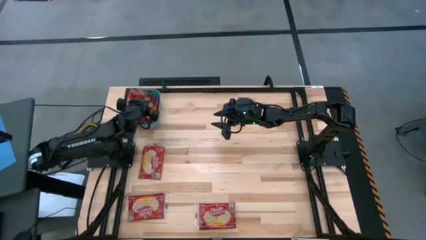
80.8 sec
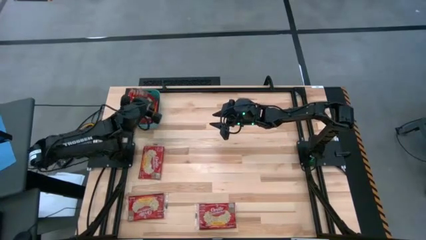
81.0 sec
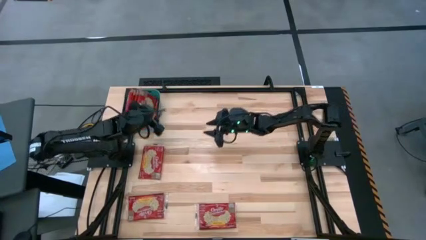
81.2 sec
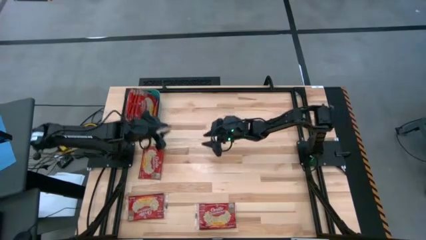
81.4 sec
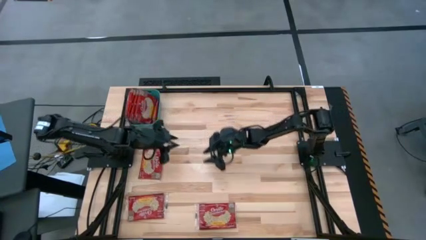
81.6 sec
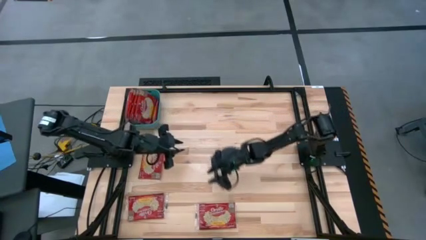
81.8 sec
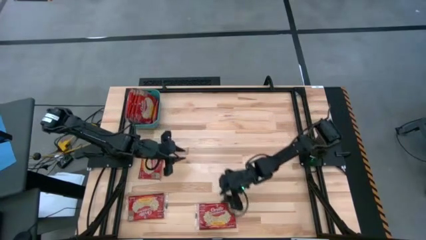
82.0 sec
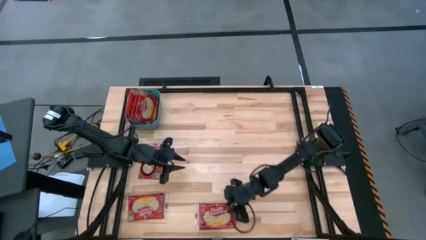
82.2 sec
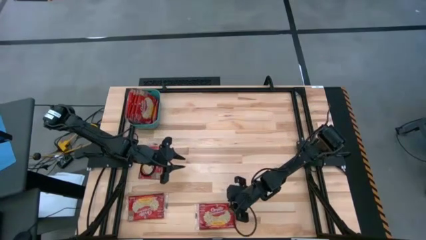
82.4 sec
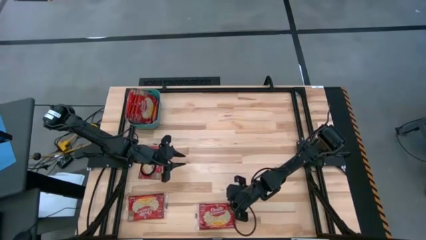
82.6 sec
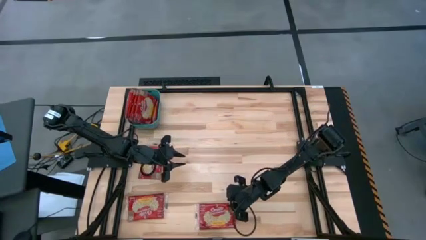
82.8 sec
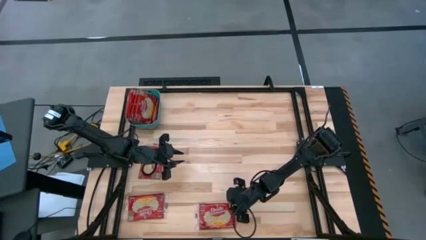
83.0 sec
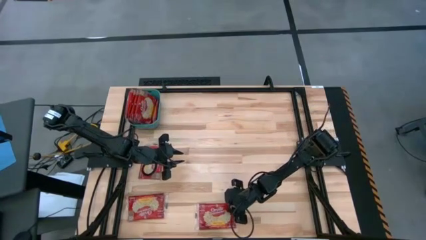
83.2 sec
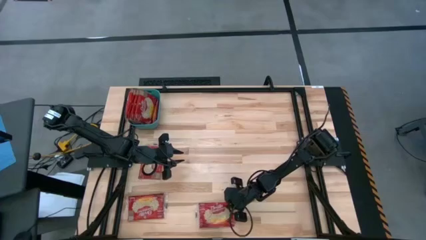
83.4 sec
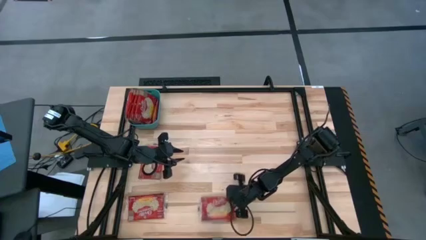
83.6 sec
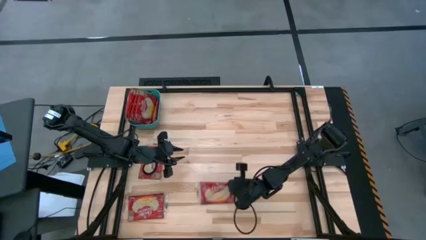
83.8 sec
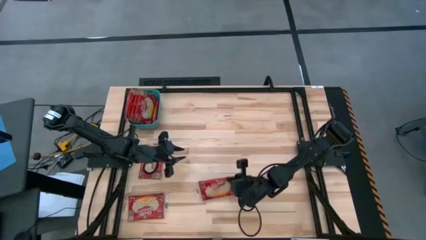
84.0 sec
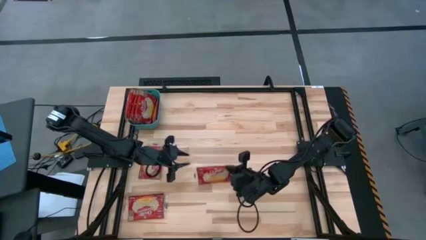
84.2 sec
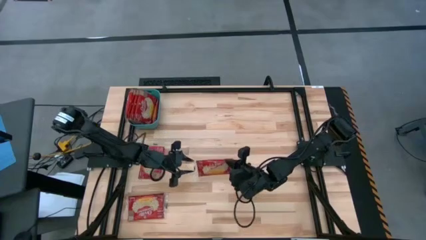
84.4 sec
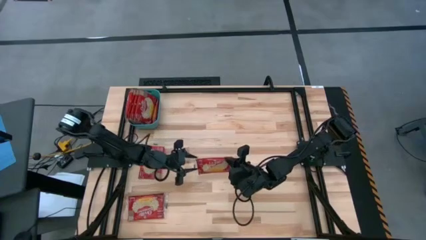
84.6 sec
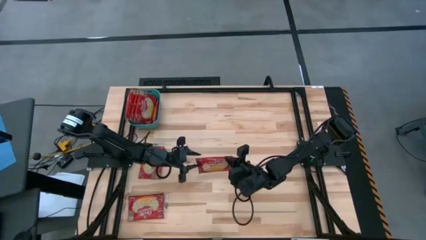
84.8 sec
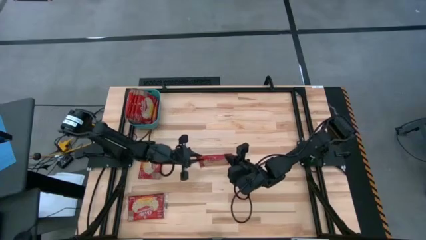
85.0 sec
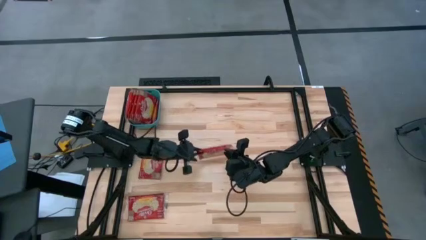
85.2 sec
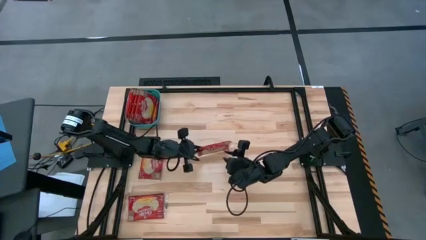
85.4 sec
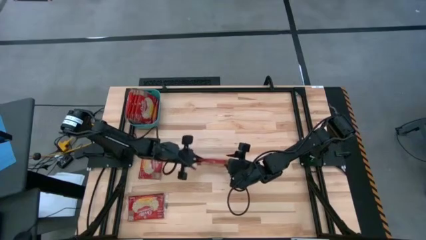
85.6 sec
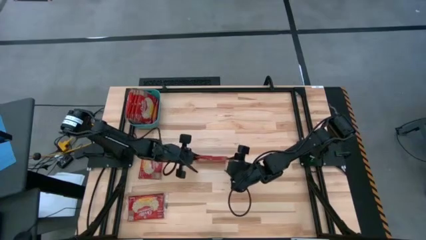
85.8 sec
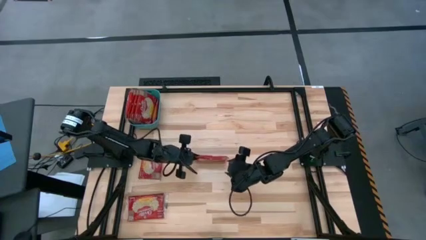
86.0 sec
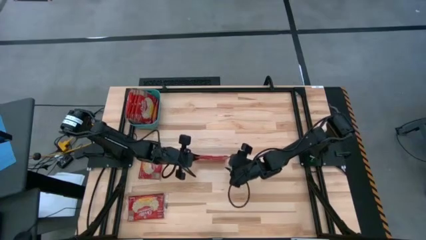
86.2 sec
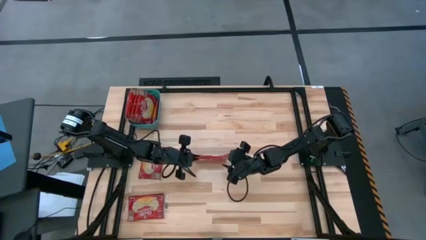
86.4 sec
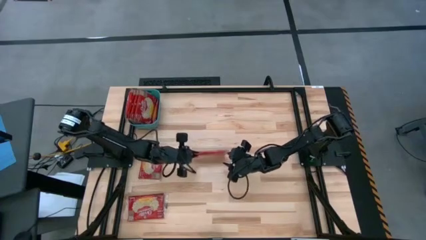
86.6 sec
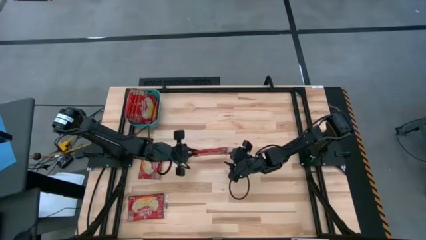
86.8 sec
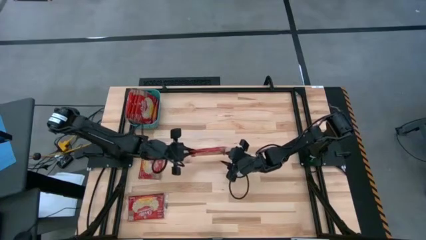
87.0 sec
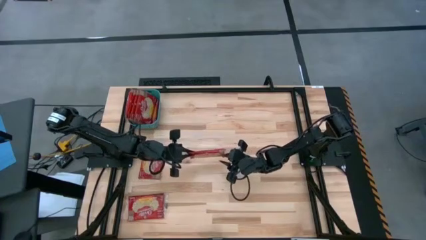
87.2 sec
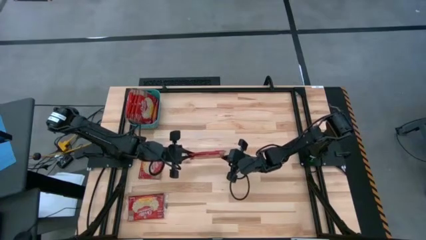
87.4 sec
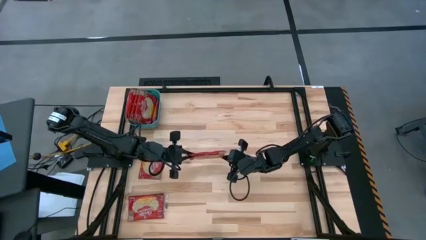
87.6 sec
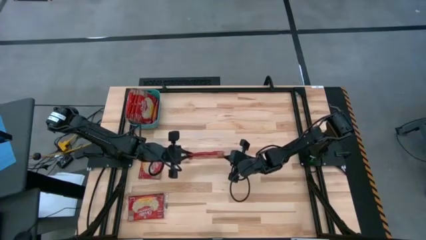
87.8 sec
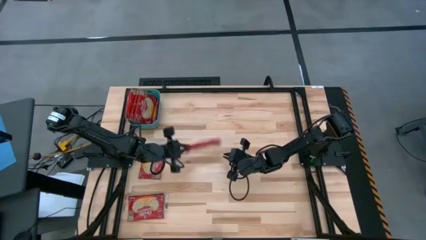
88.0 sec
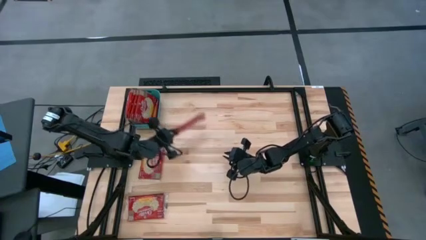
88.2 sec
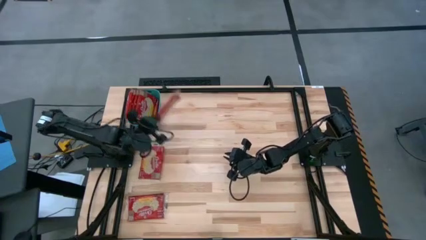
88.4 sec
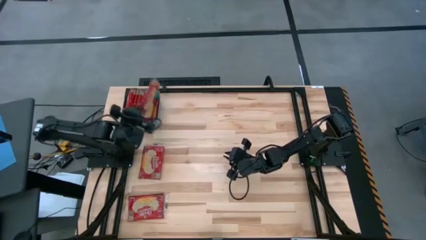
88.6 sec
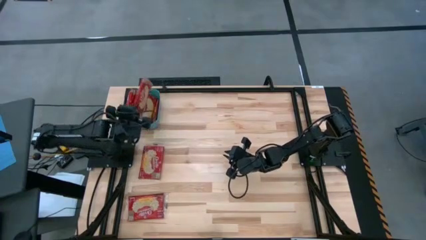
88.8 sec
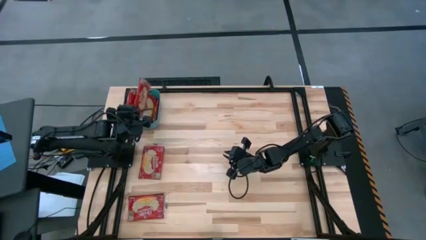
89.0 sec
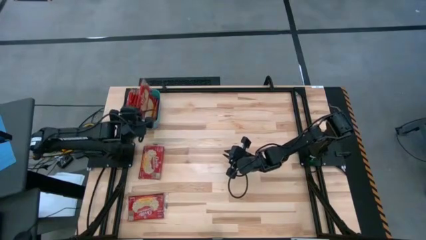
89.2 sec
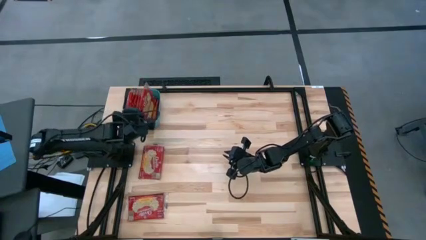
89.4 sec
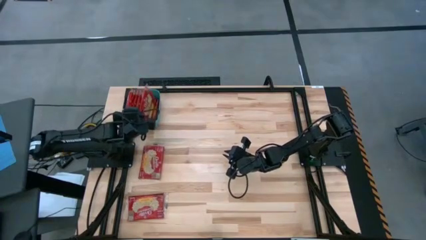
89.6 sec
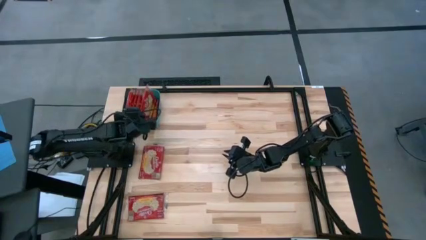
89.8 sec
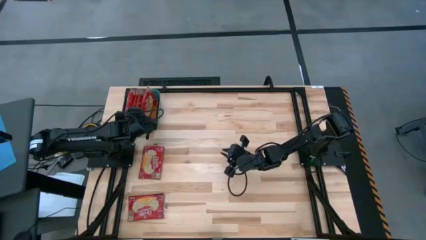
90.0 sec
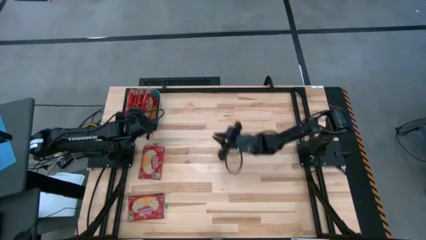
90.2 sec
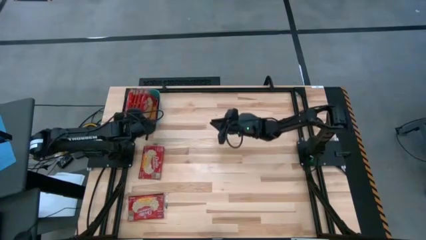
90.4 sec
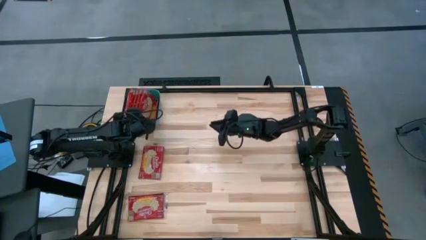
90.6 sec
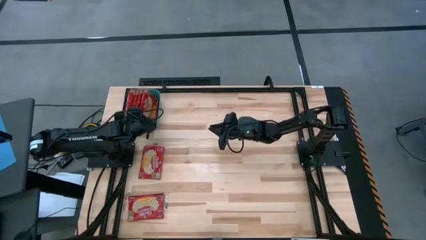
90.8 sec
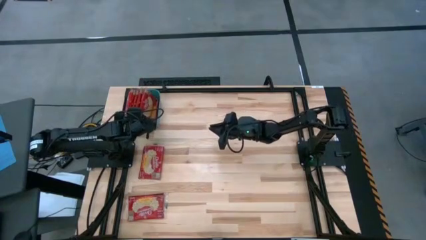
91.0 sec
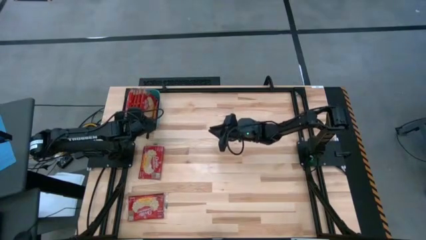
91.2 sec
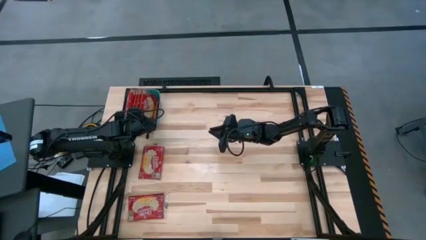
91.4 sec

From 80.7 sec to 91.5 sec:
Task: Sort popcorn bags into baskets
Put the red popcorn bag in the blue bin

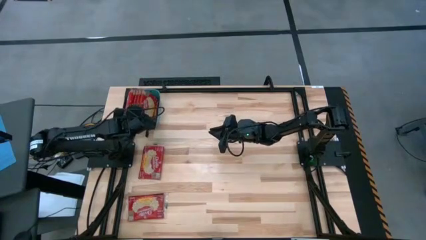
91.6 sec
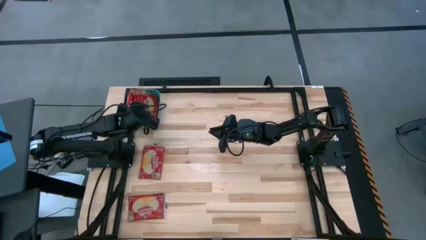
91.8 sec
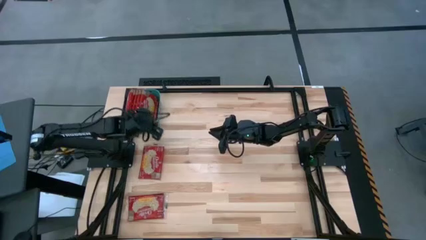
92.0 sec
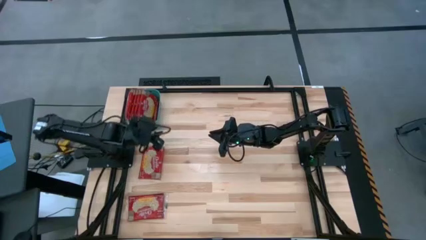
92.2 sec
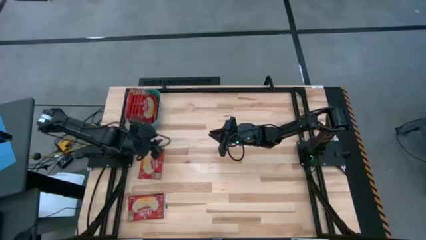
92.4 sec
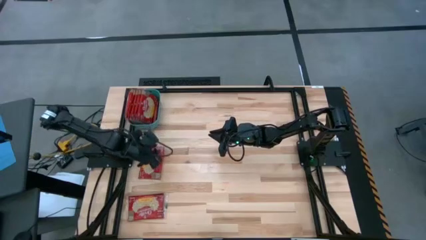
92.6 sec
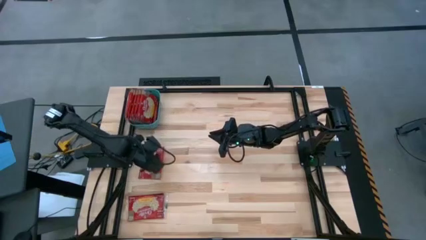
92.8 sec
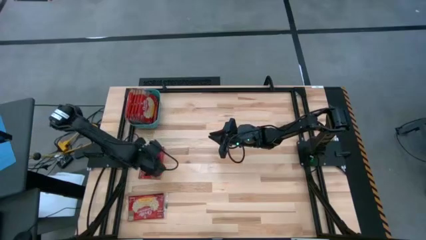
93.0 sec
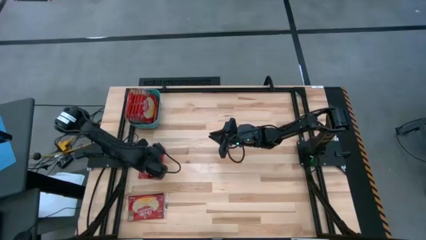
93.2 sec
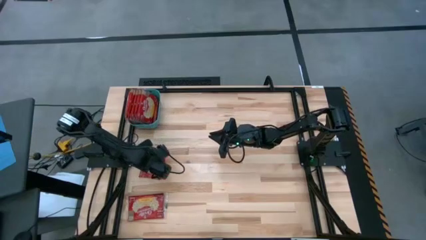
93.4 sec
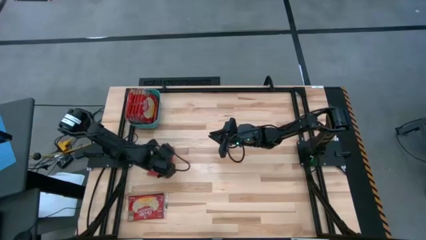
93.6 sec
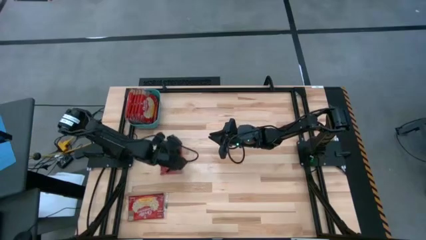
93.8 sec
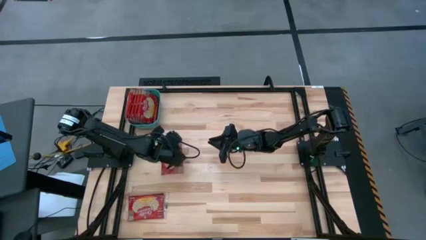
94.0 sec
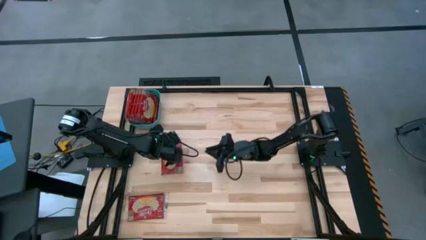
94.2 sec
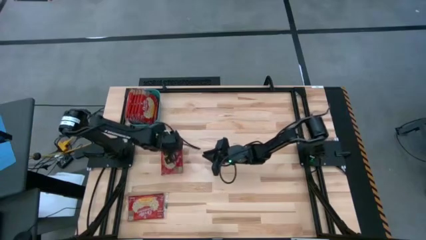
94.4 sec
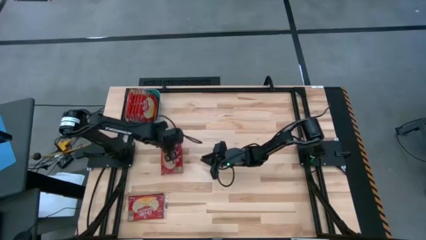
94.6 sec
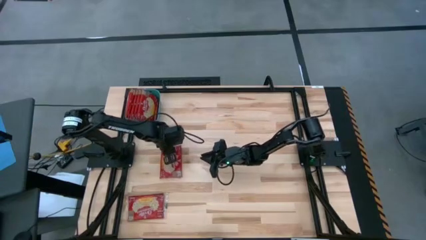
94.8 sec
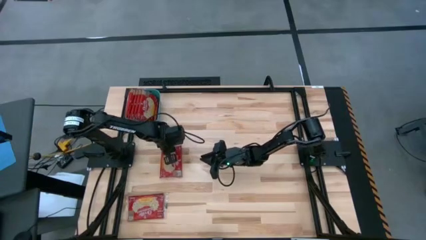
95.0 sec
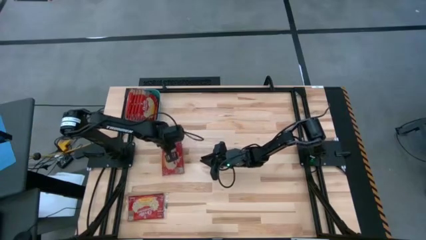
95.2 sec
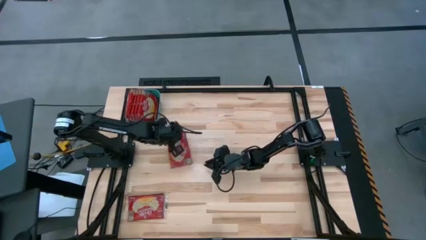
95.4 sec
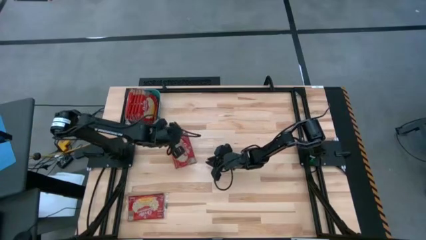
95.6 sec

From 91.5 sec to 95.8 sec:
Put the red popcorn bag in the blue bin
